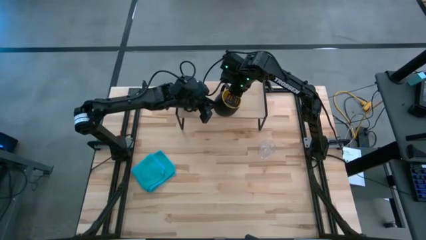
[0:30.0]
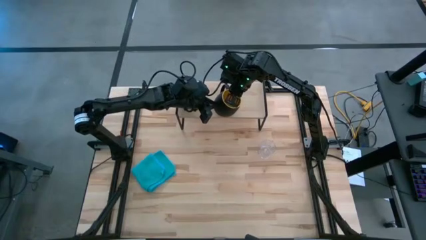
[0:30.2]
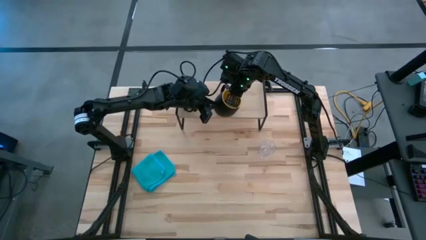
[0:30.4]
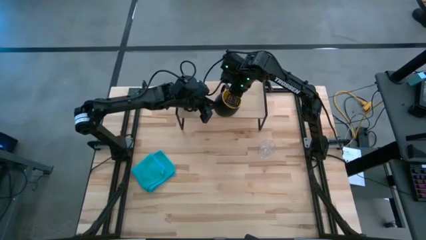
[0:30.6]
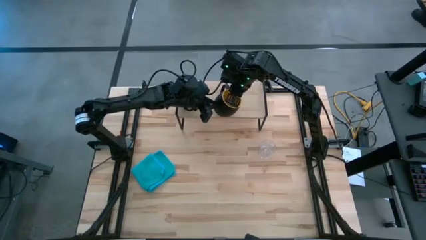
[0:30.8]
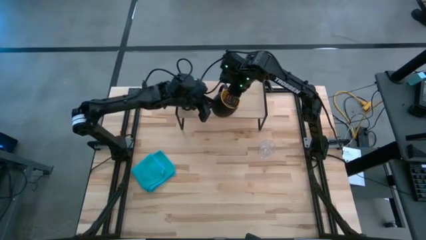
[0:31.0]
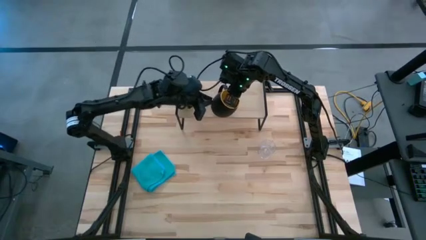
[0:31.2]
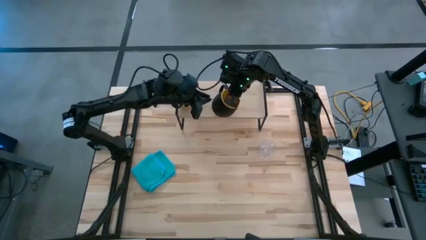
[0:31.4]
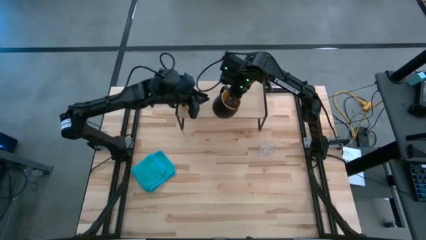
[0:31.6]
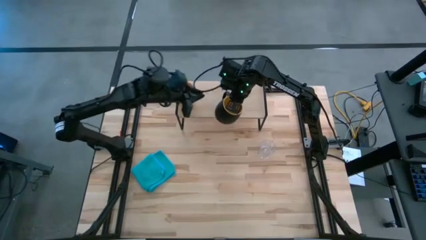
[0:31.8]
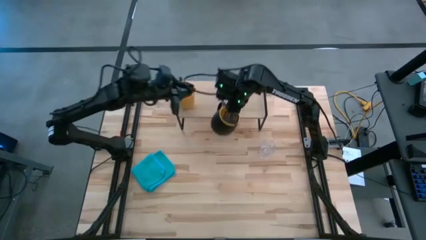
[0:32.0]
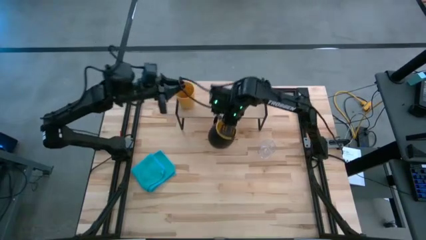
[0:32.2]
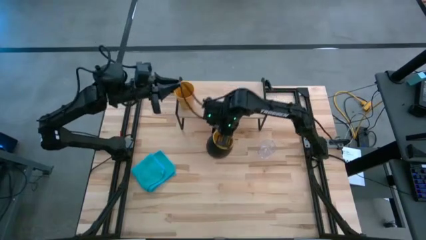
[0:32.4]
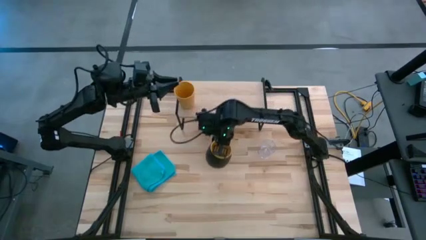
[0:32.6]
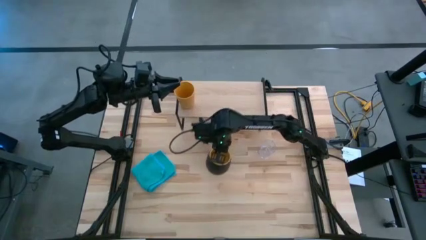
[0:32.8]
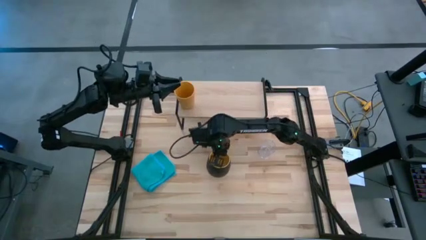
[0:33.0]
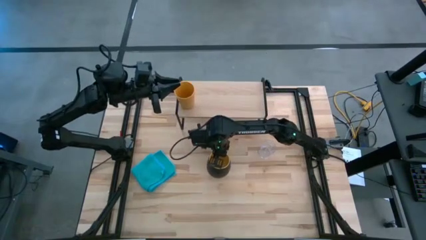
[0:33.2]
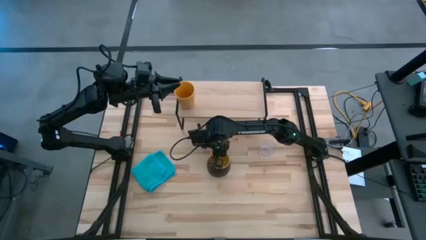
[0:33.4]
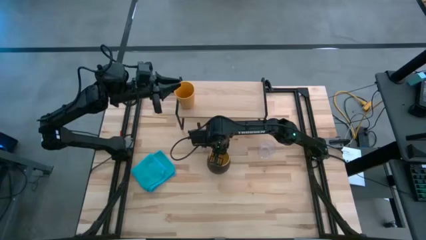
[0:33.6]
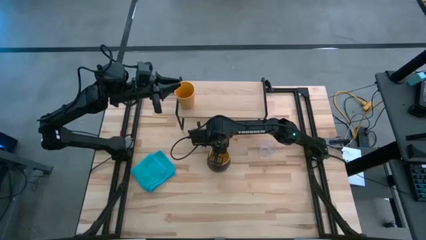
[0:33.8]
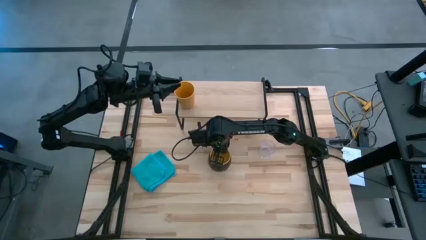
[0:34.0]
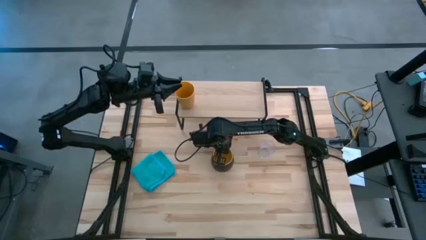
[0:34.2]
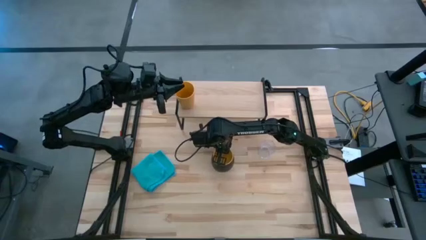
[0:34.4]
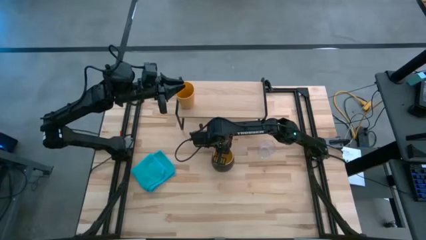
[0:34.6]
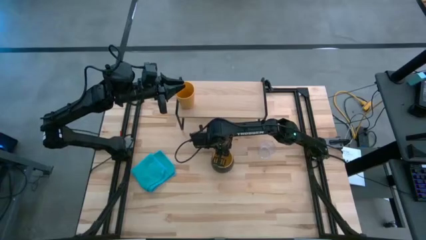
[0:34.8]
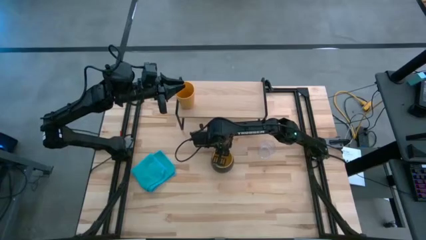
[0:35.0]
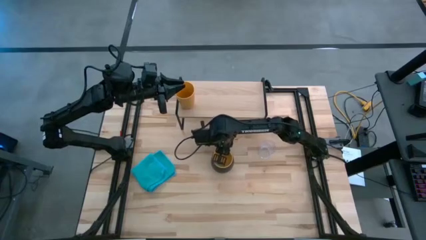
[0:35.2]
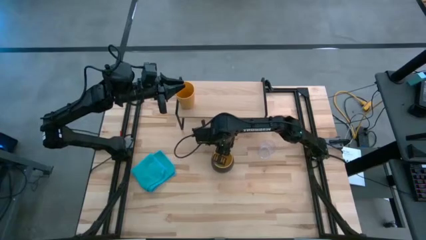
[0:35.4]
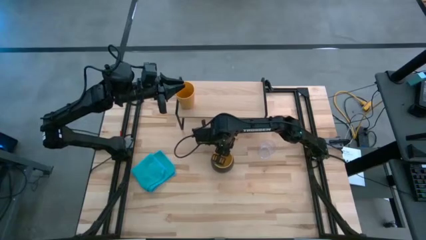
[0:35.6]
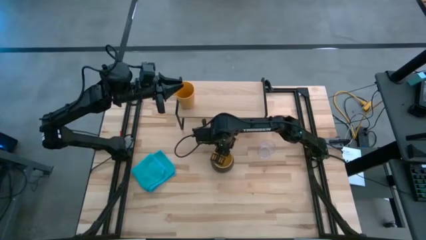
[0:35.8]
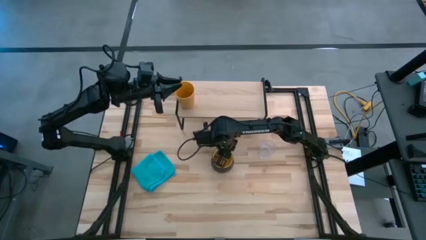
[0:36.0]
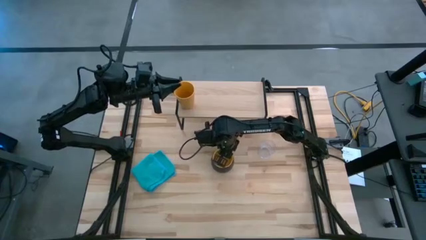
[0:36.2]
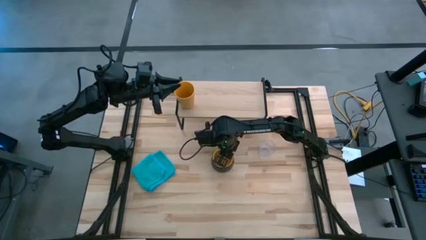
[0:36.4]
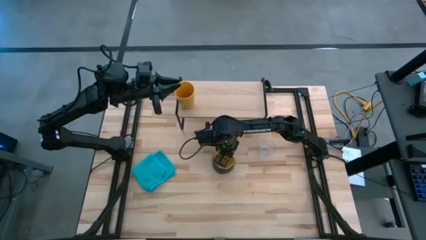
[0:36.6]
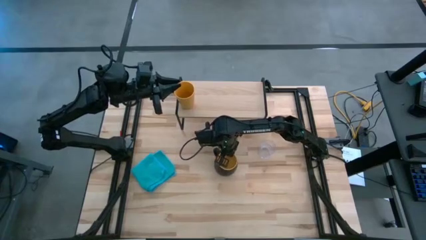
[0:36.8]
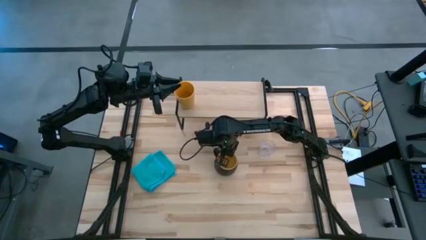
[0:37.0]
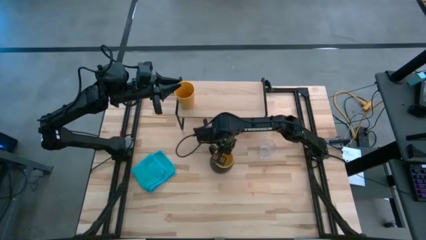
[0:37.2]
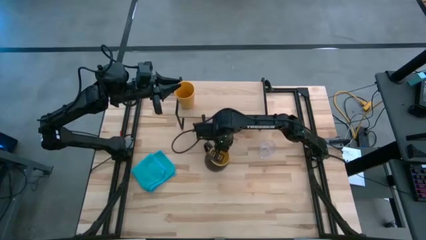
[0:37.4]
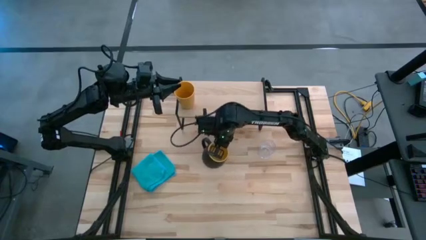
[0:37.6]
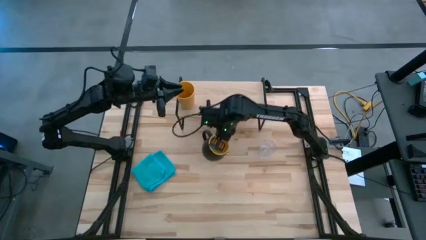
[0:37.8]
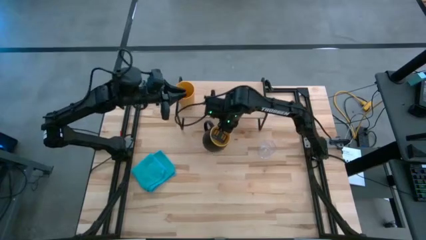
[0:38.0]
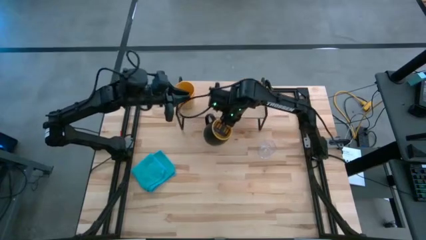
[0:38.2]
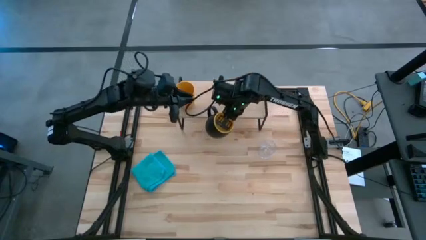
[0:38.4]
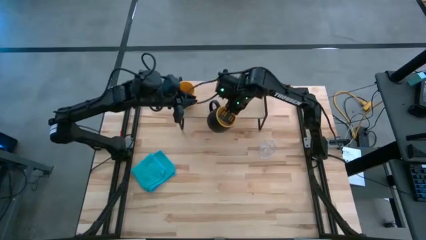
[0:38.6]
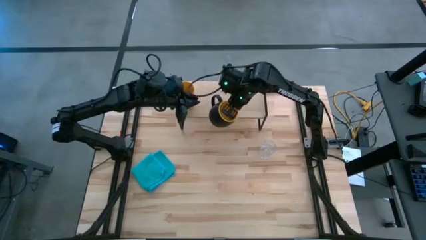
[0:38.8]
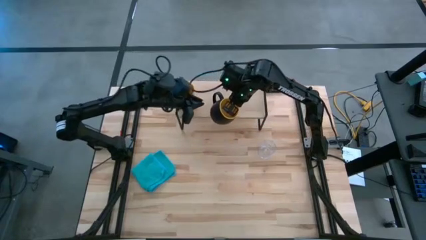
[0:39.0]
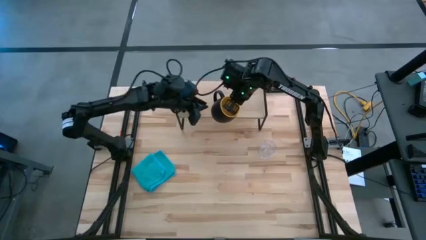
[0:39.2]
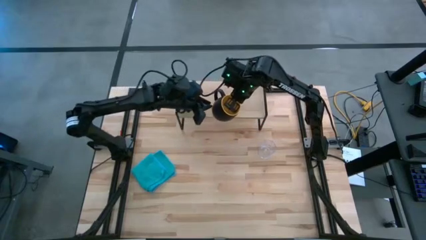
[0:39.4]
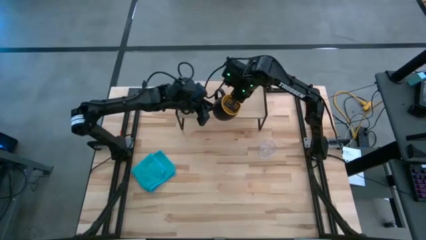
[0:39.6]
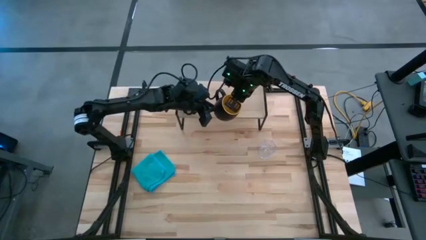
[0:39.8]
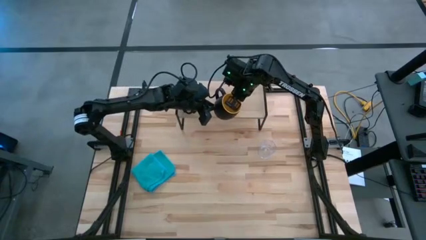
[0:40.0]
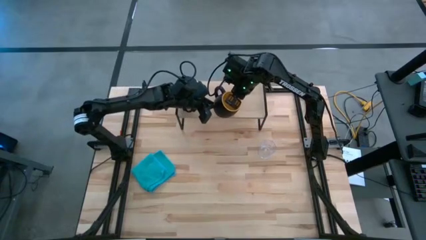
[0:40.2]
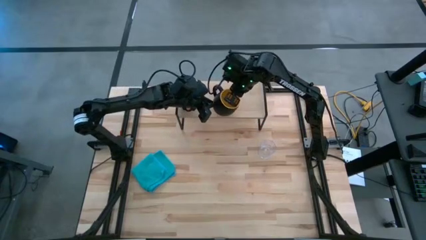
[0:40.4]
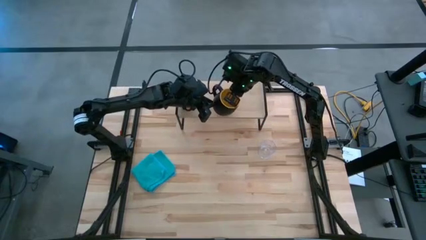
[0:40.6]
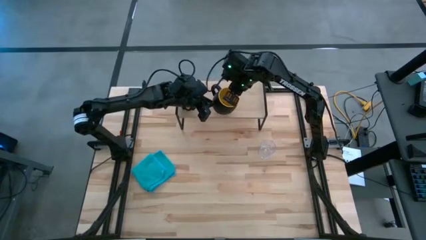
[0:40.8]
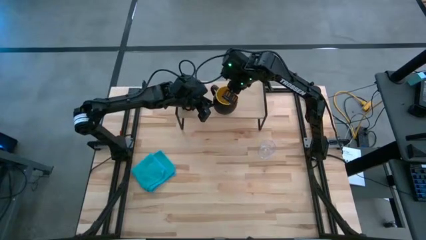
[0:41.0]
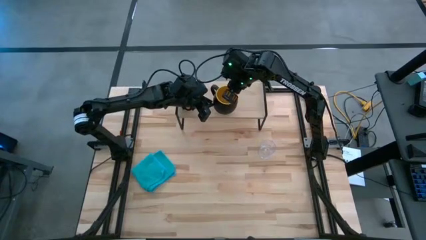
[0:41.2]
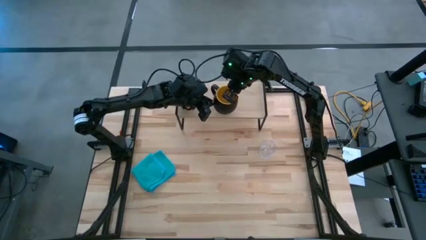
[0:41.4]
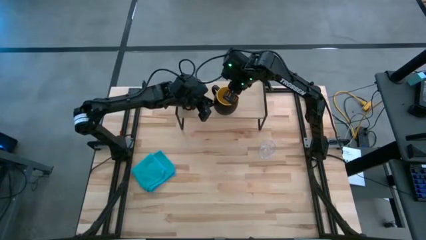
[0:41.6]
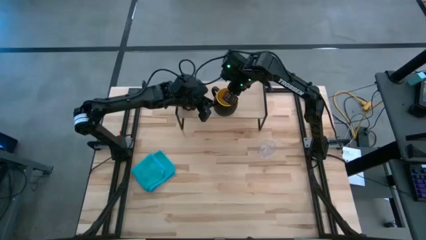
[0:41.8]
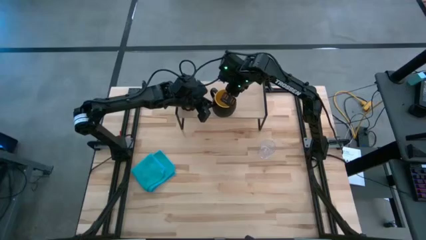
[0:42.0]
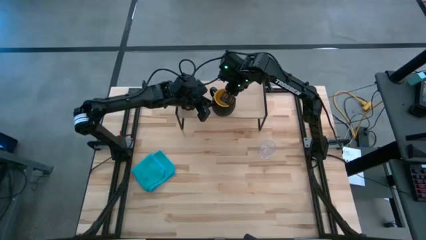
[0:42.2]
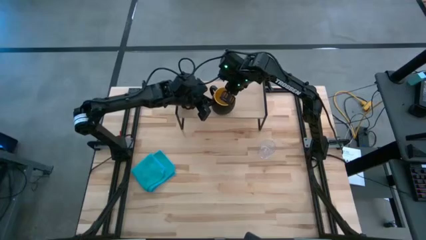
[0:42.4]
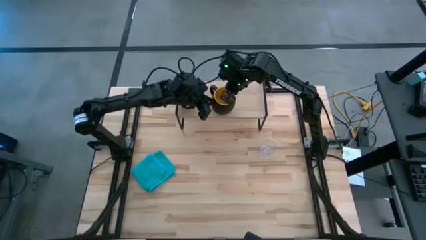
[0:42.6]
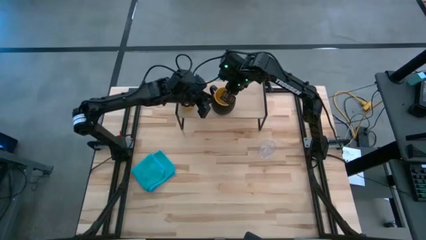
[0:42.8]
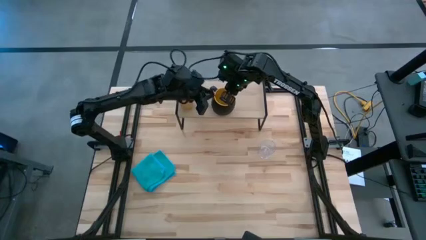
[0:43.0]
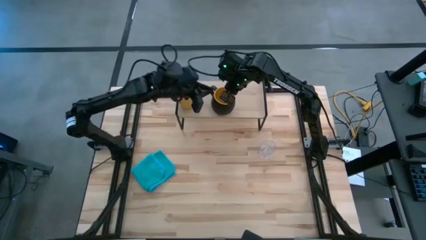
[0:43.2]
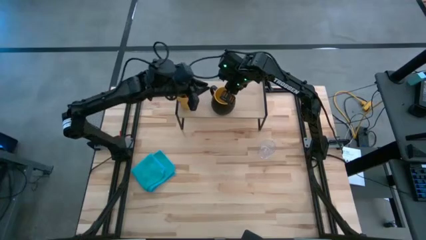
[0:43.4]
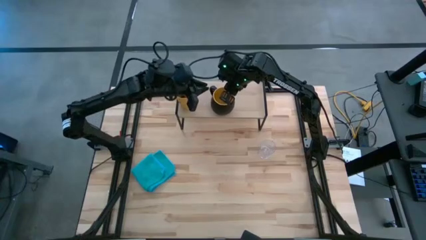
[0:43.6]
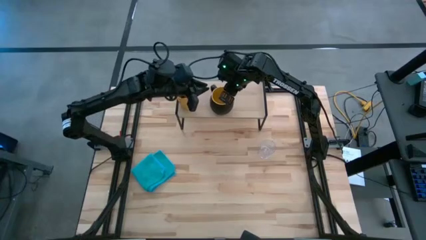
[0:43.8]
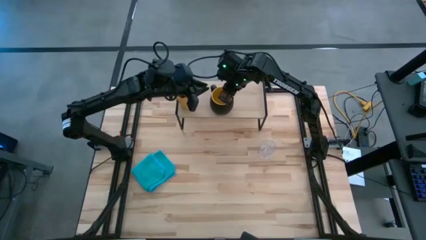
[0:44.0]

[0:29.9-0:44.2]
Task: Stack small to large cups/mugs on shelf
Put the black mug on the shelf
